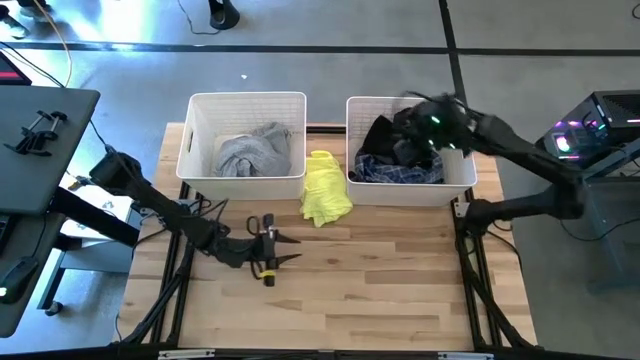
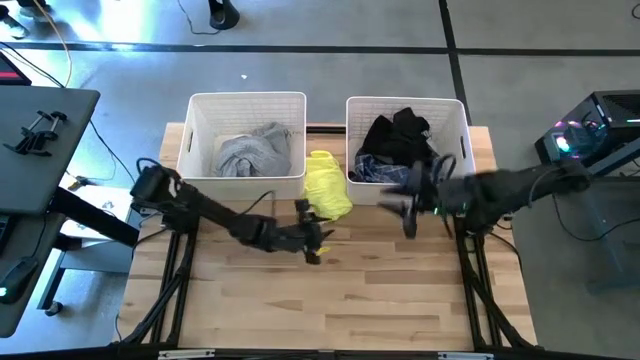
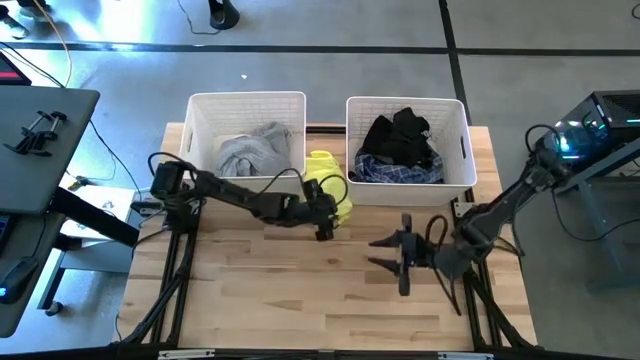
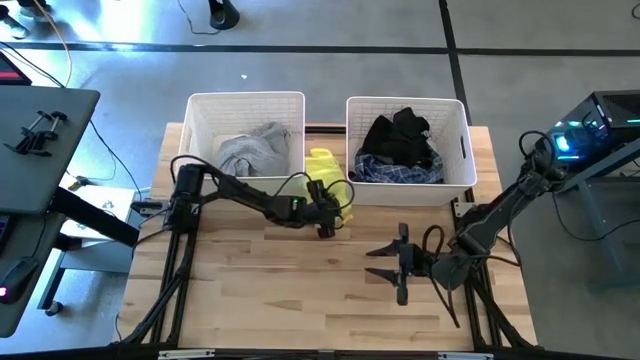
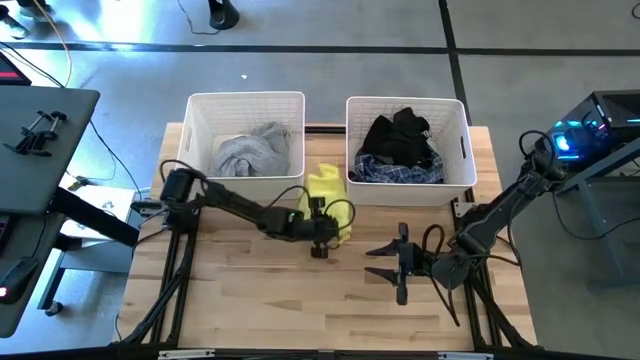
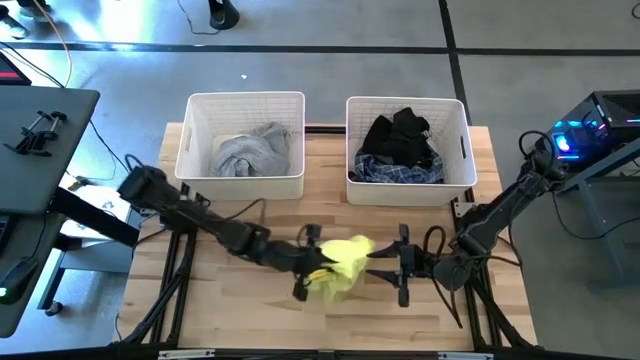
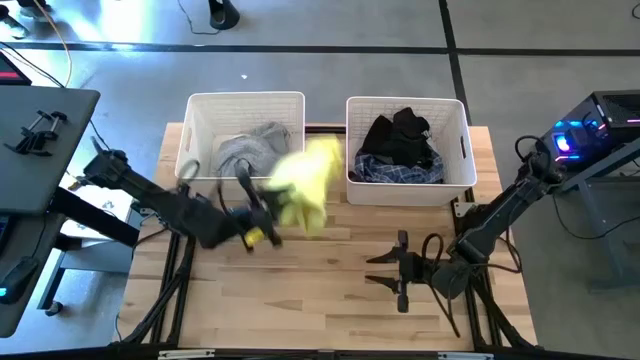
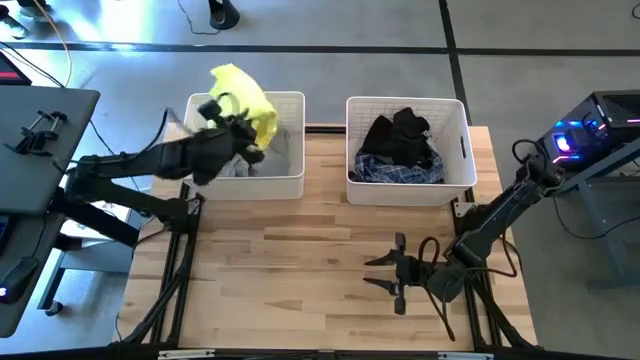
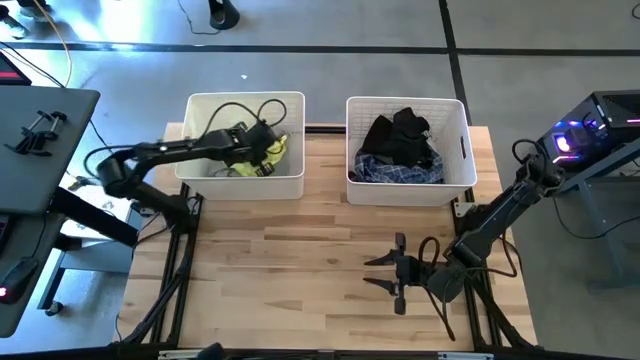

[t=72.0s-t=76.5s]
Task: Sort clothes
Put the yellow shirt into the left white laundry bin

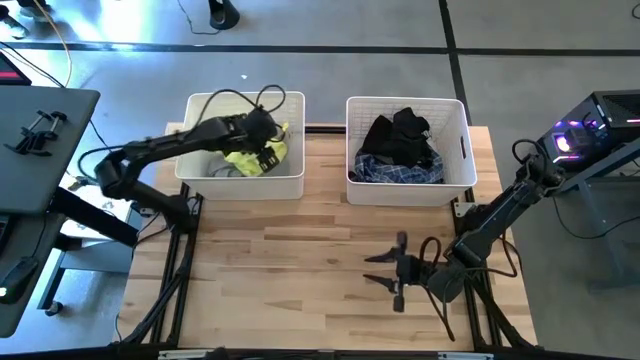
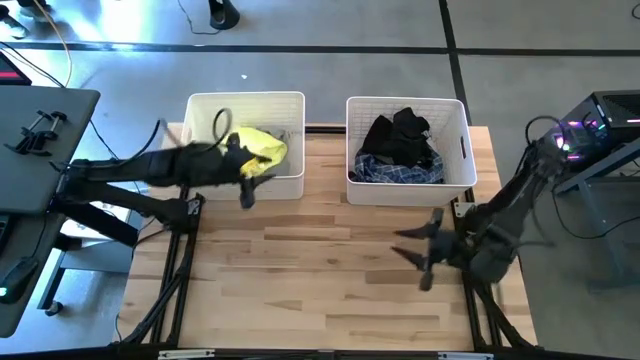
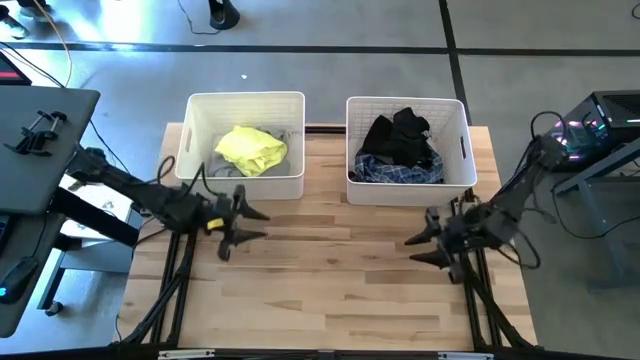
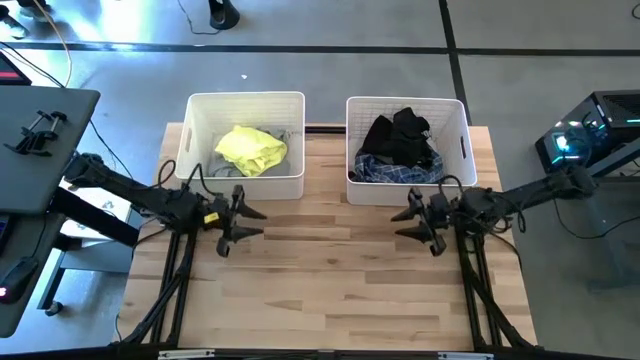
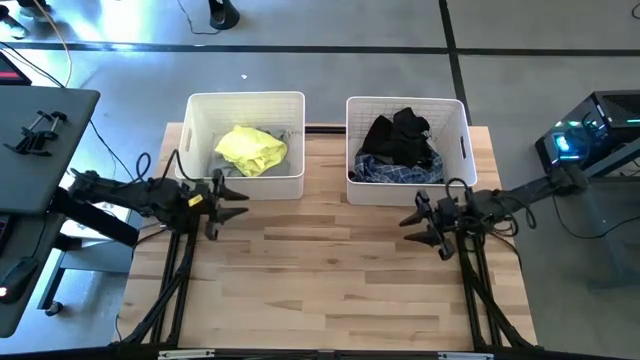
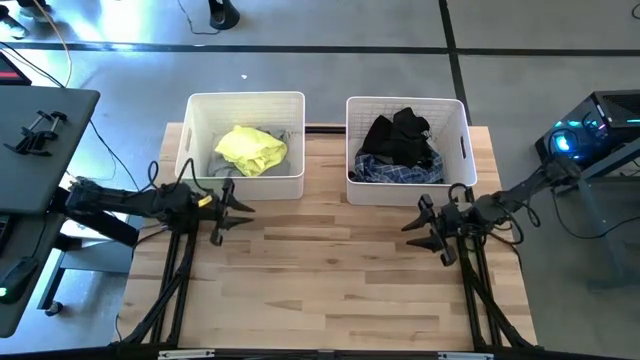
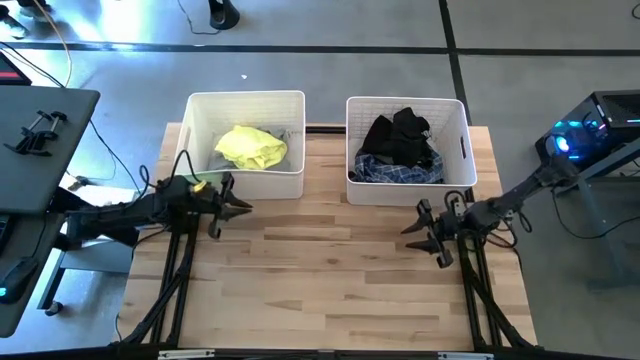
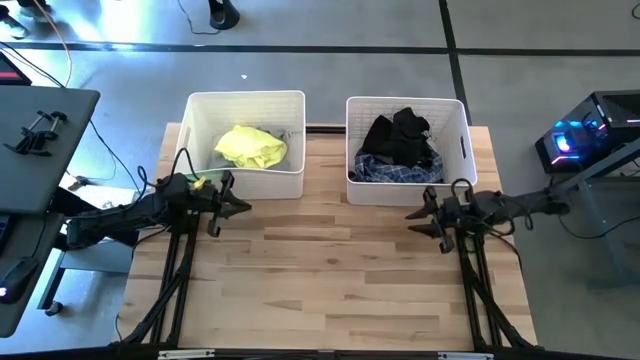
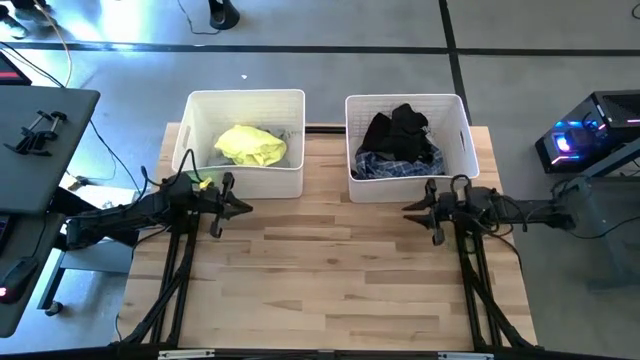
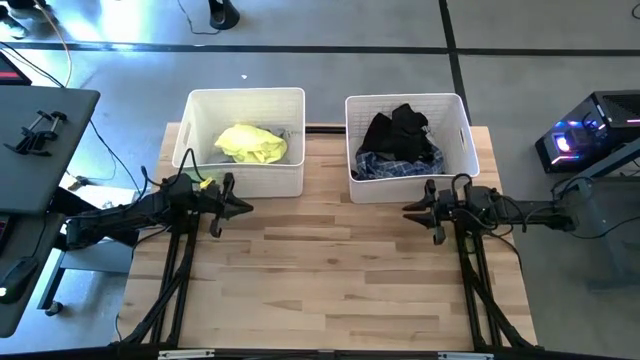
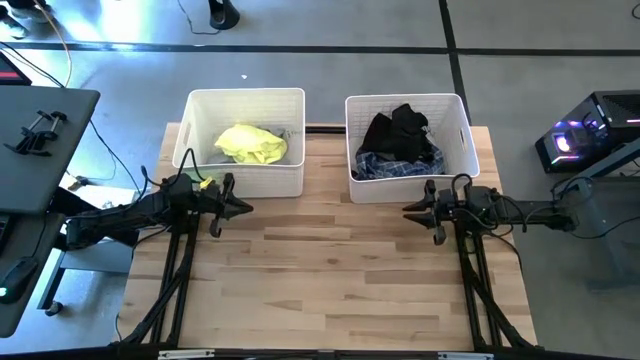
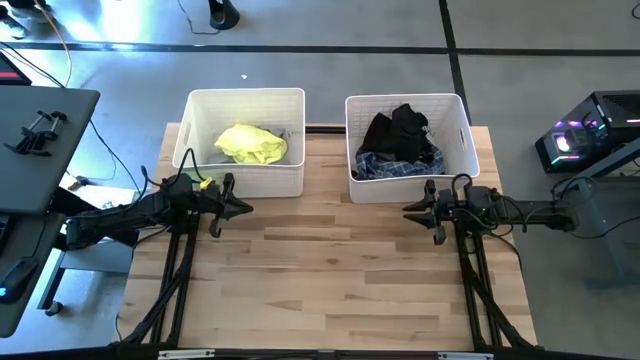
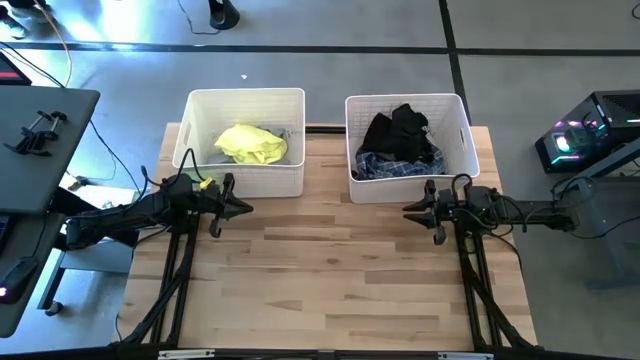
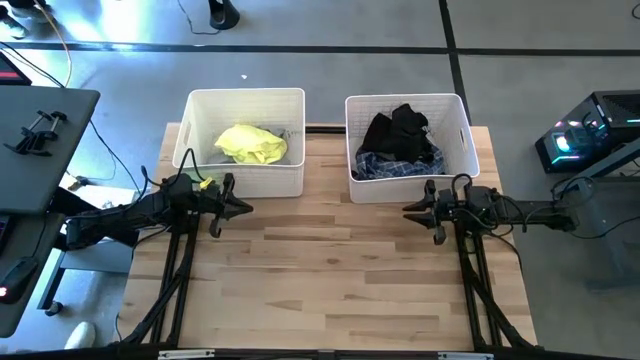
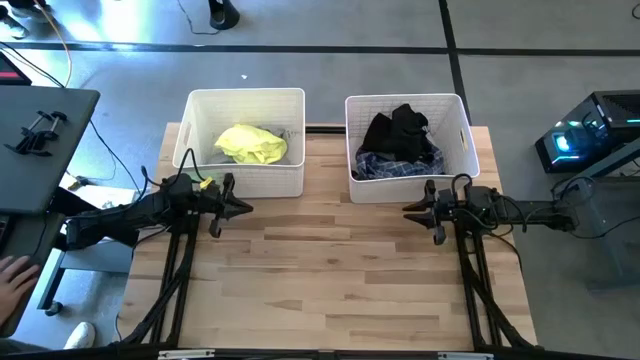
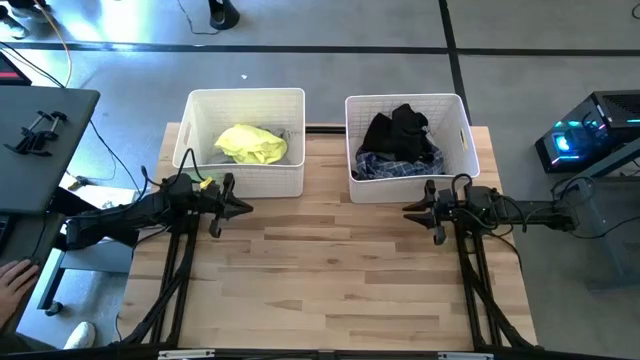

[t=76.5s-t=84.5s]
Return to Home Position

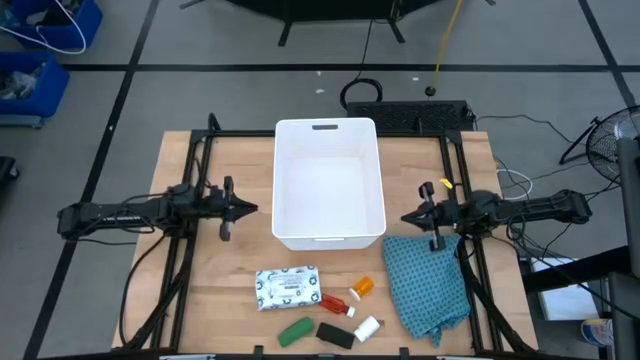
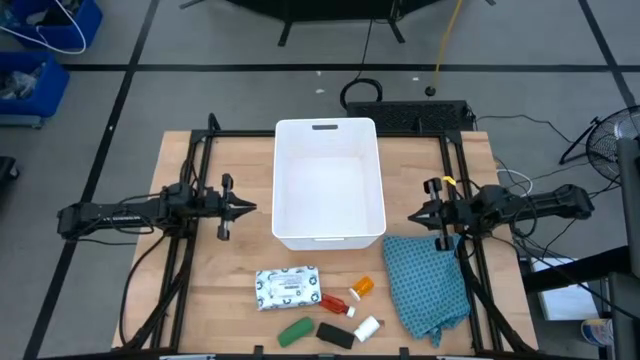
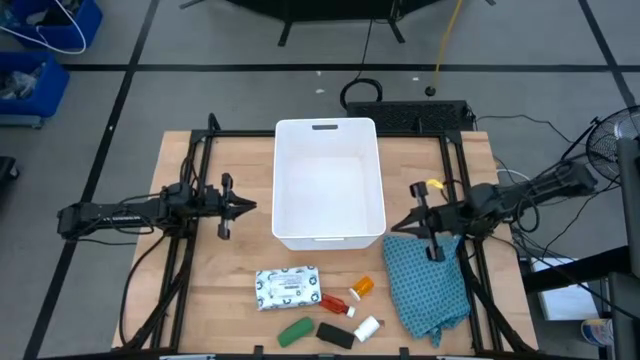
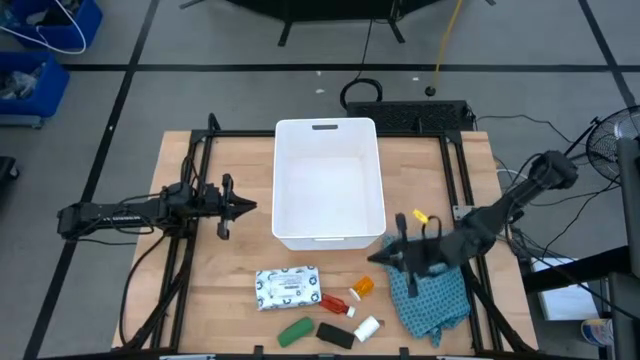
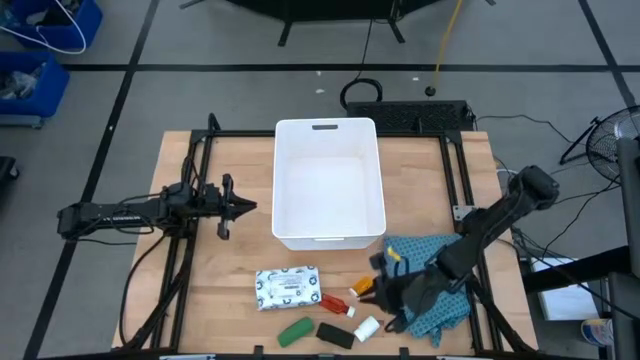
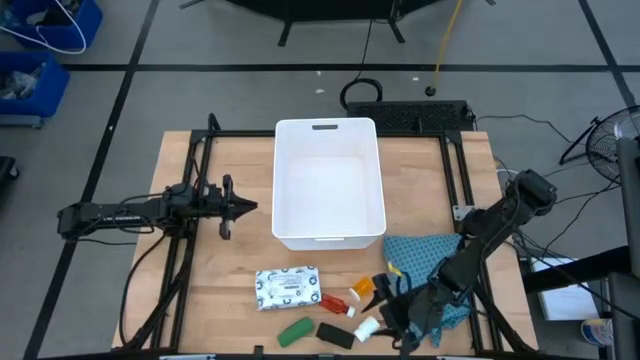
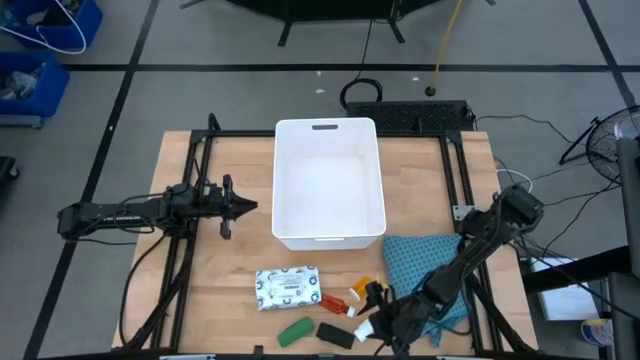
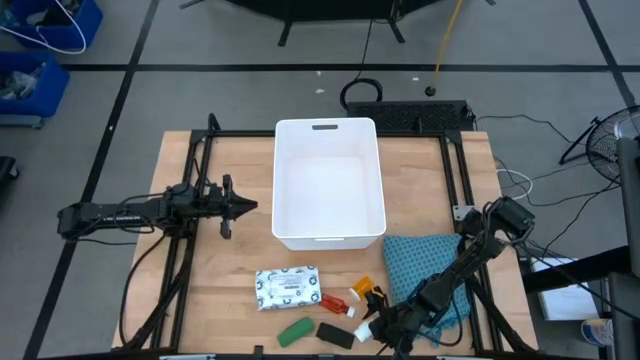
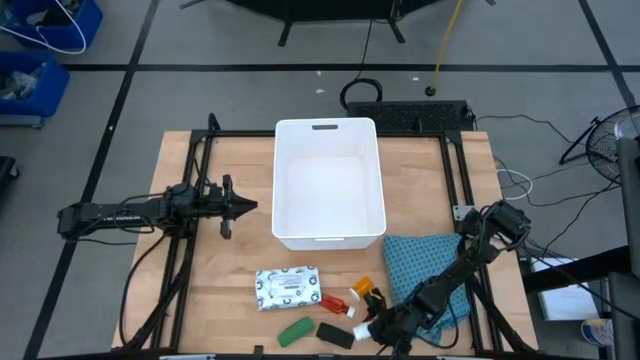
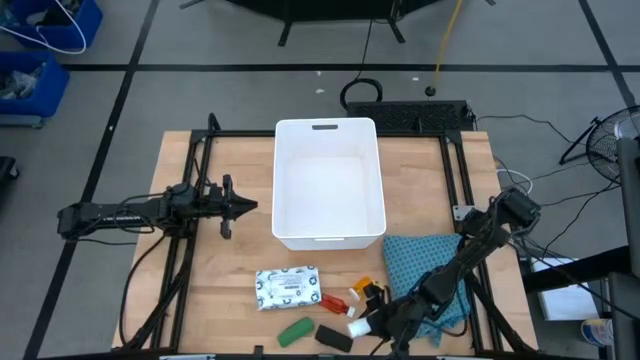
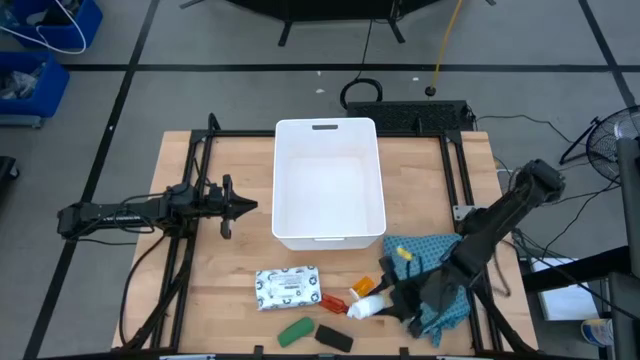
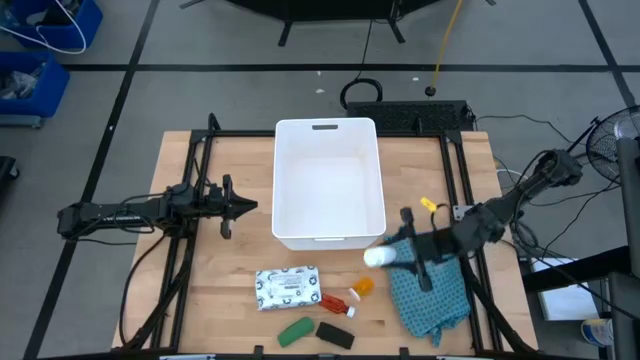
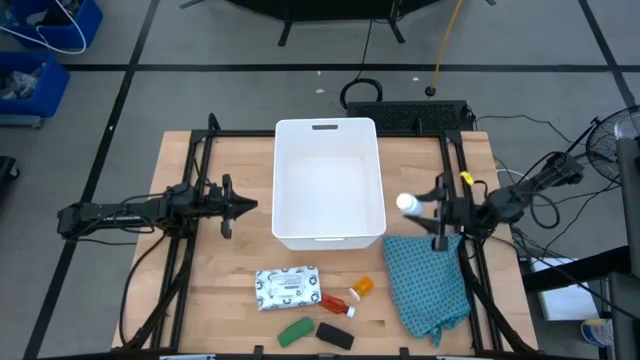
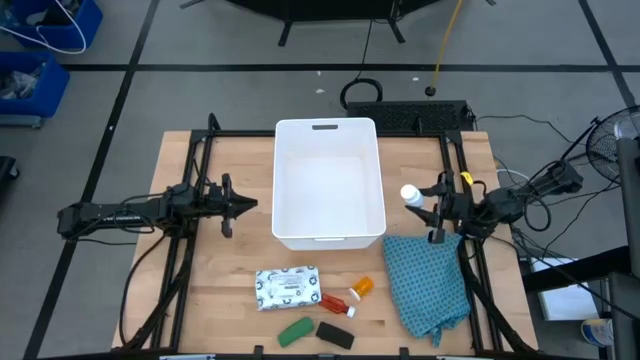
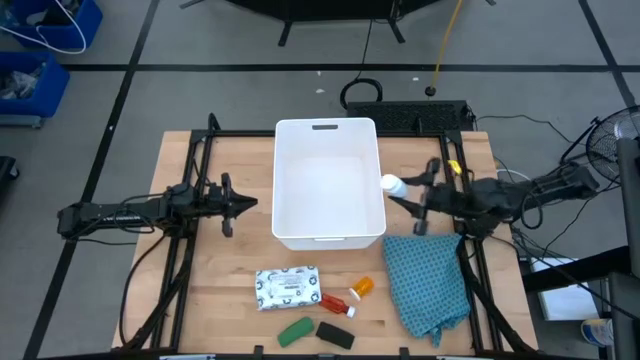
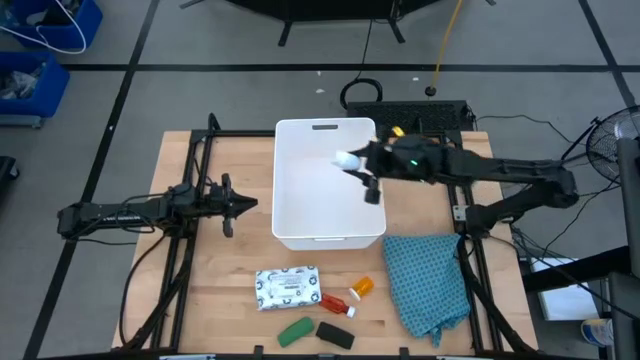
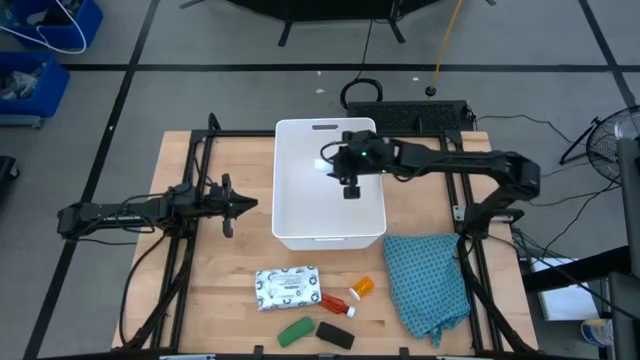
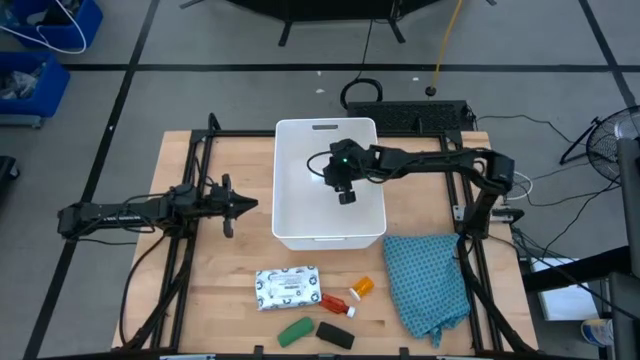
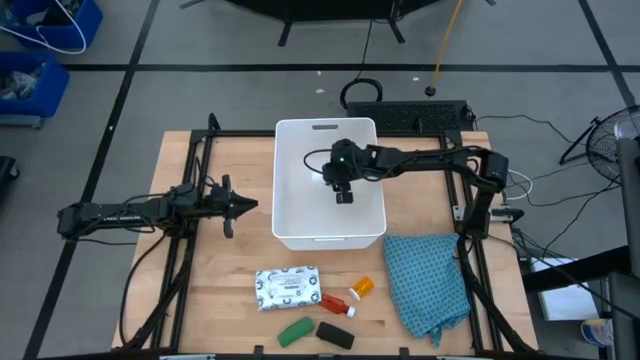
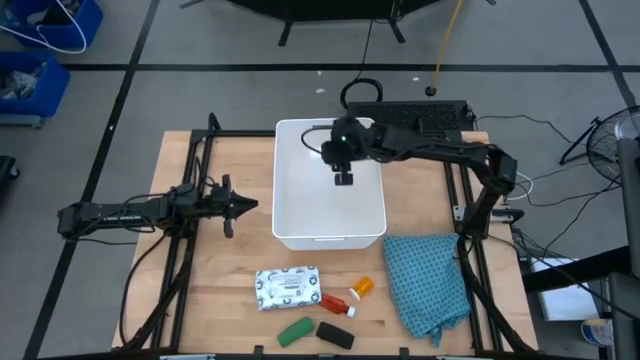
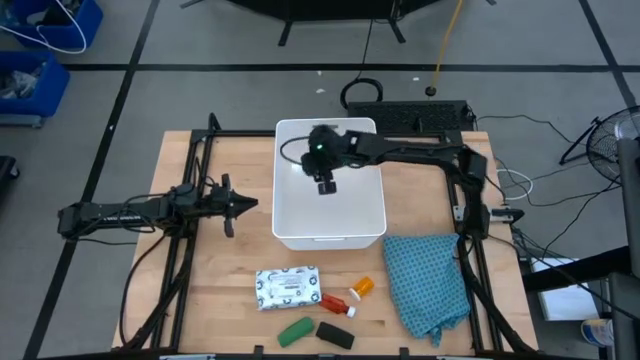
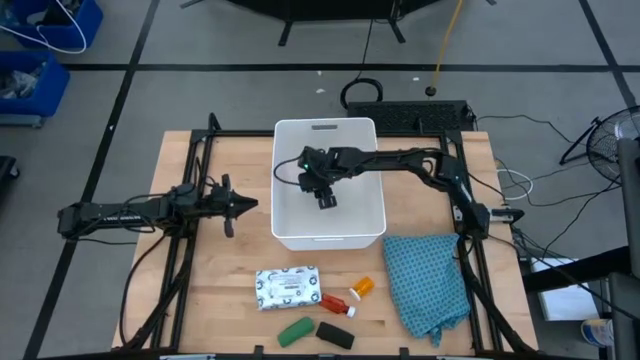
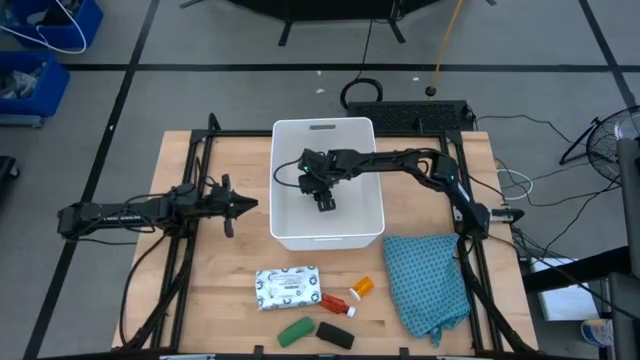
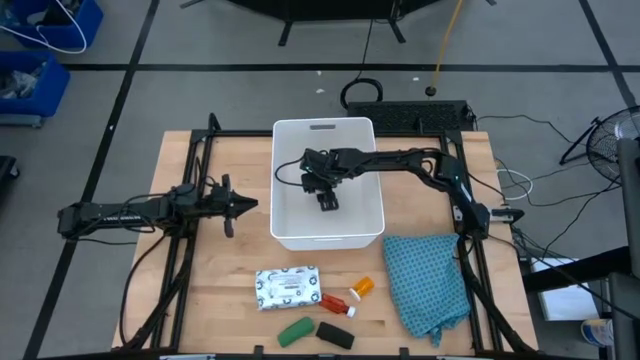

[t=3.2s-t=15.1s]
Task: Pick & place medical supplies in basket/bin
Put the white medicine bottle into the white bin
